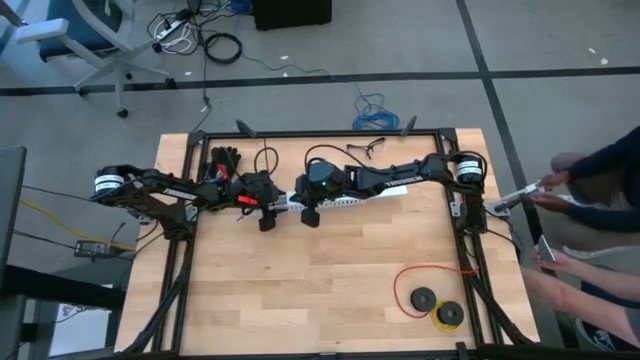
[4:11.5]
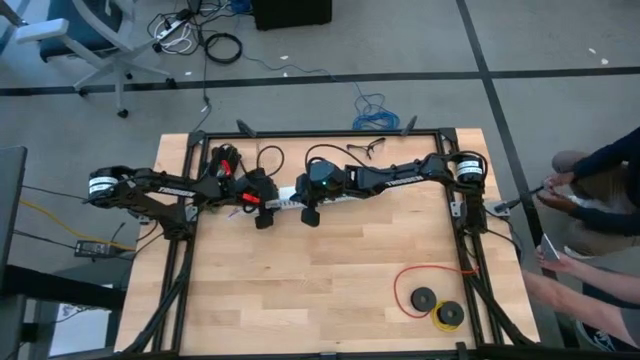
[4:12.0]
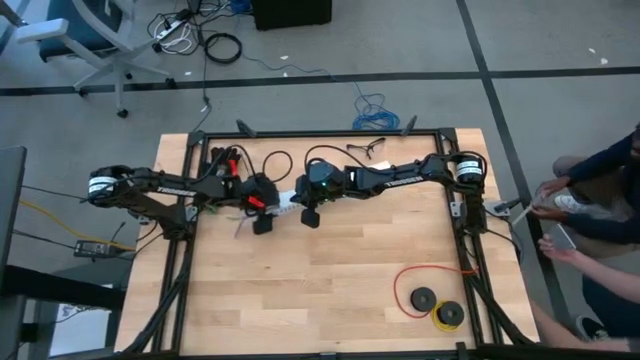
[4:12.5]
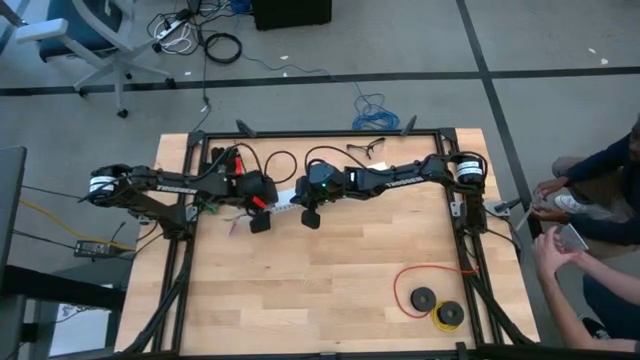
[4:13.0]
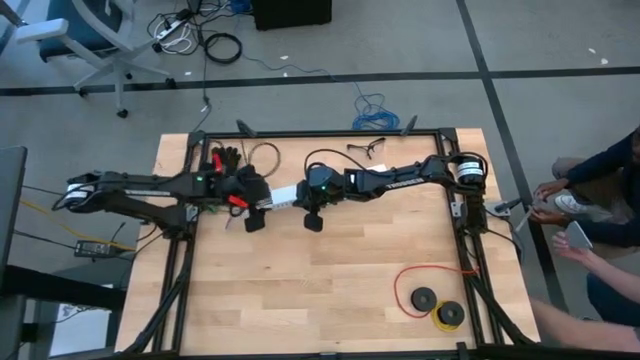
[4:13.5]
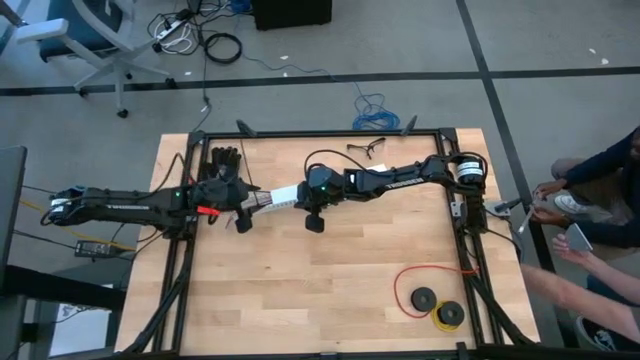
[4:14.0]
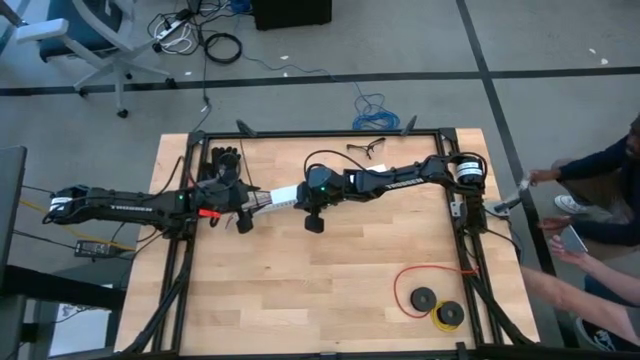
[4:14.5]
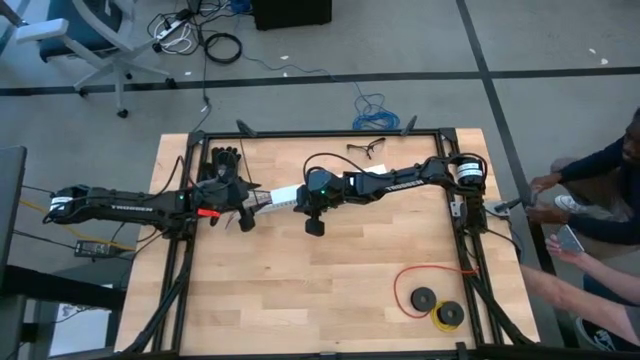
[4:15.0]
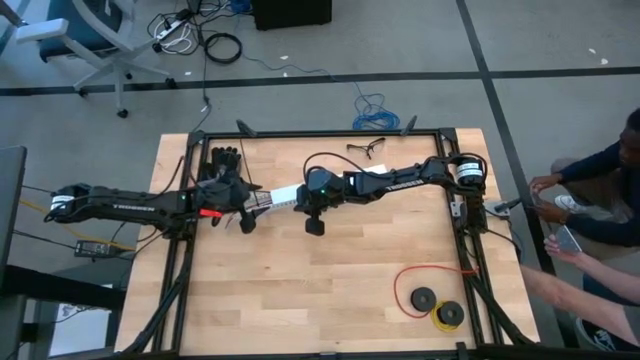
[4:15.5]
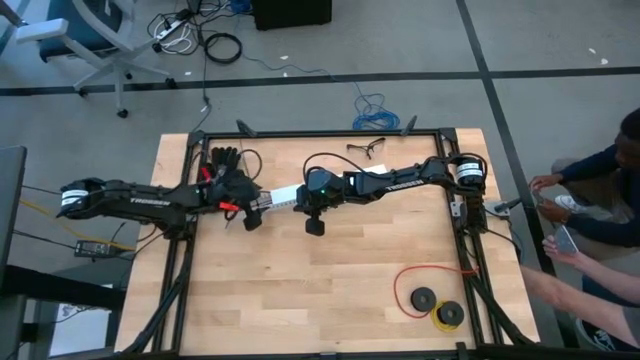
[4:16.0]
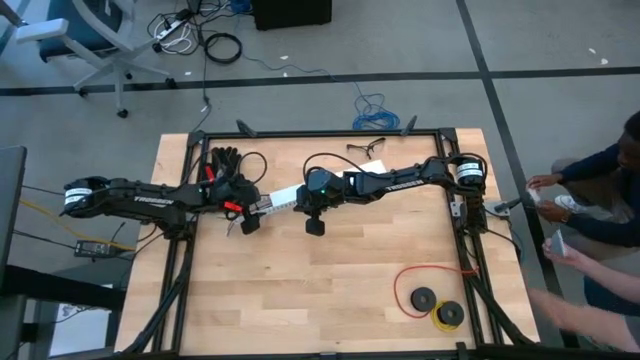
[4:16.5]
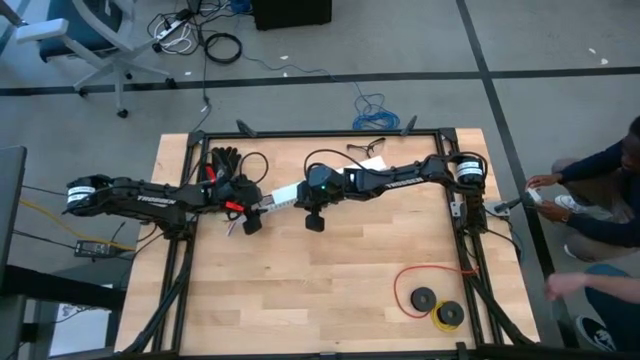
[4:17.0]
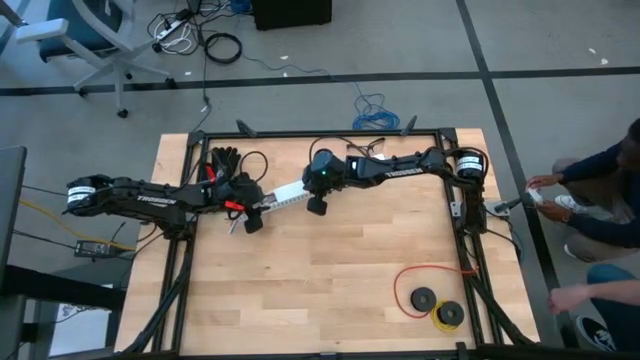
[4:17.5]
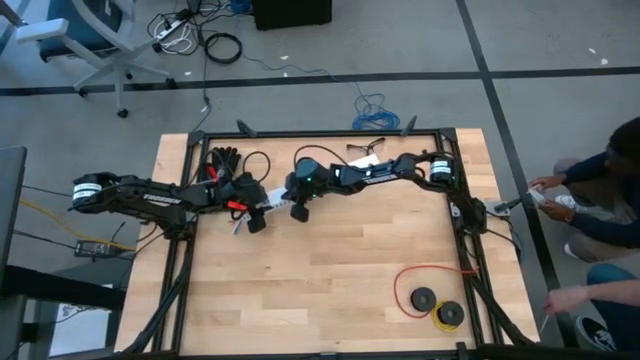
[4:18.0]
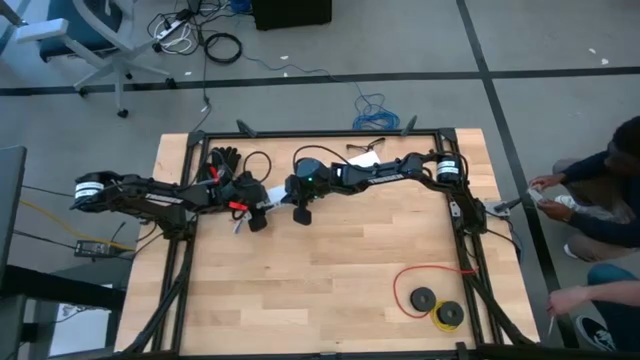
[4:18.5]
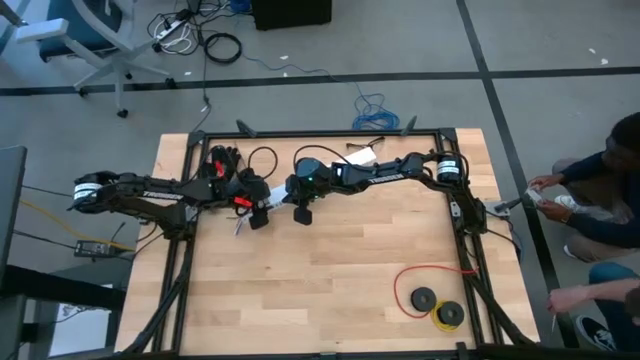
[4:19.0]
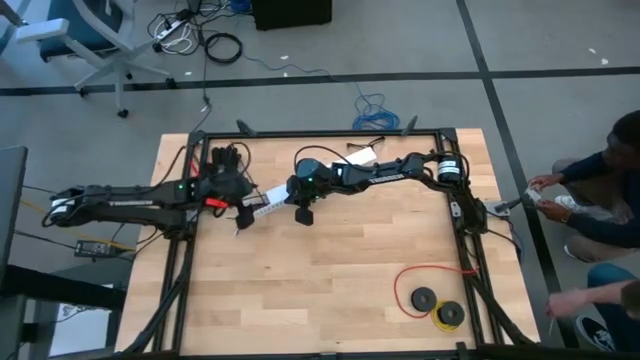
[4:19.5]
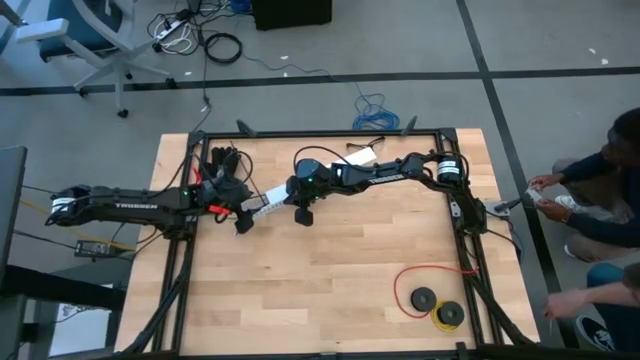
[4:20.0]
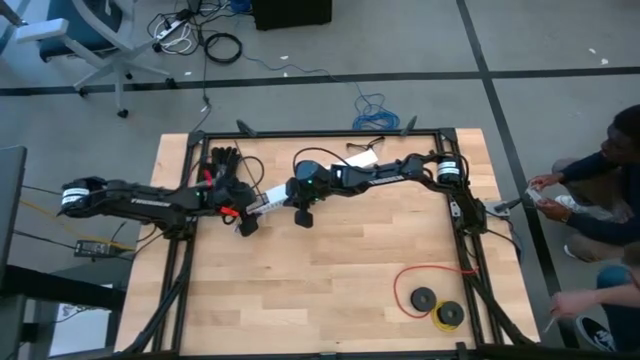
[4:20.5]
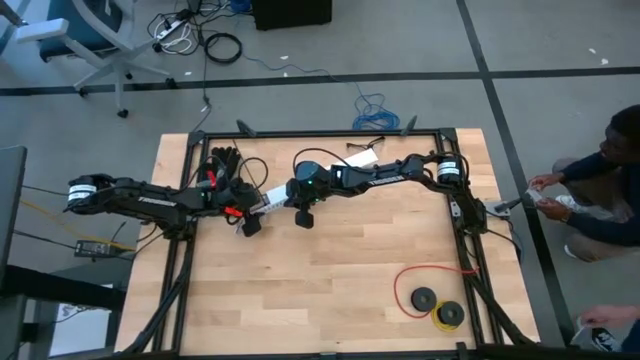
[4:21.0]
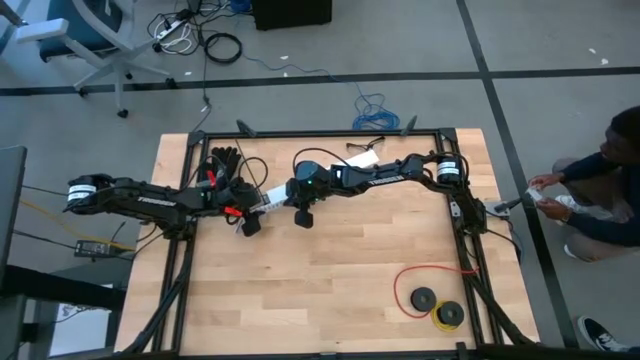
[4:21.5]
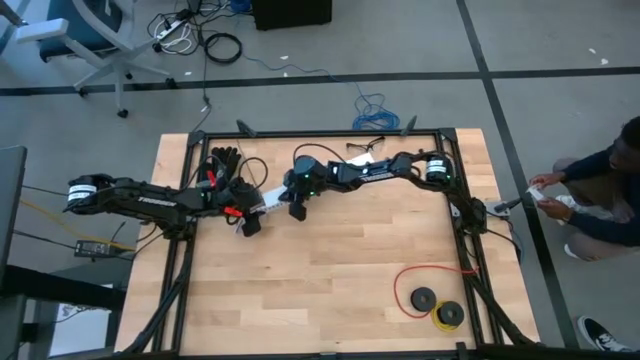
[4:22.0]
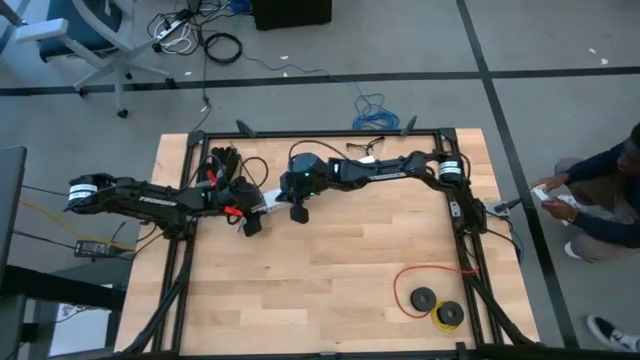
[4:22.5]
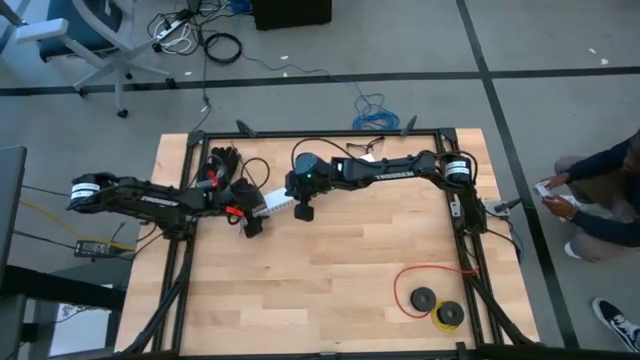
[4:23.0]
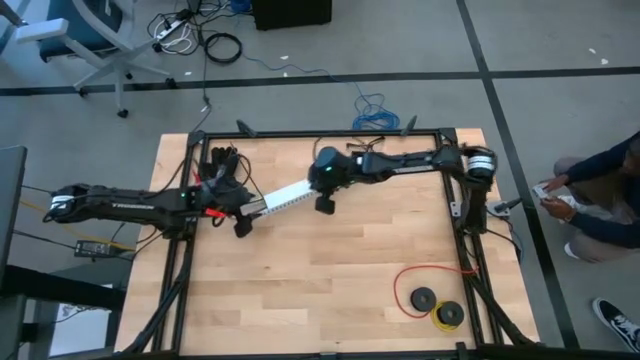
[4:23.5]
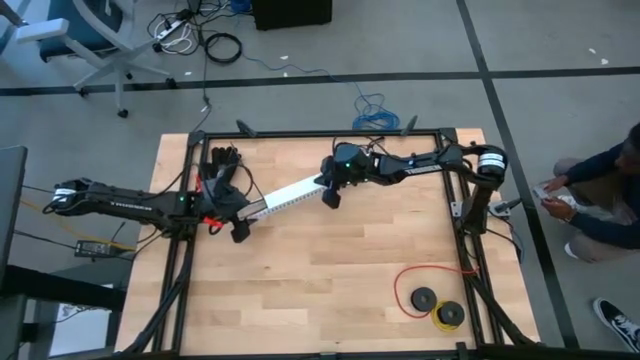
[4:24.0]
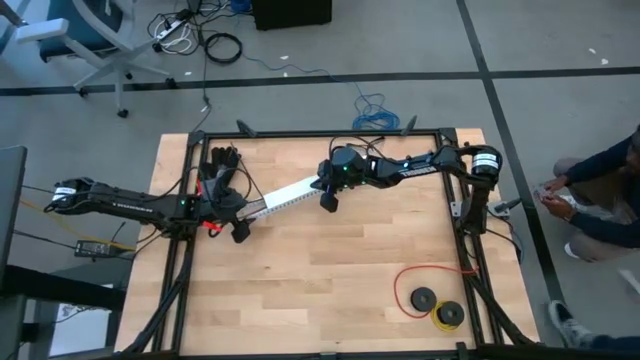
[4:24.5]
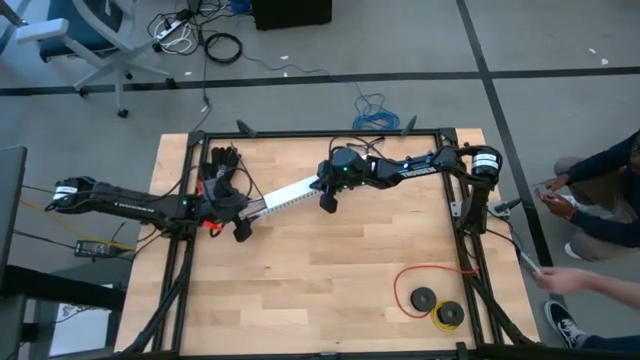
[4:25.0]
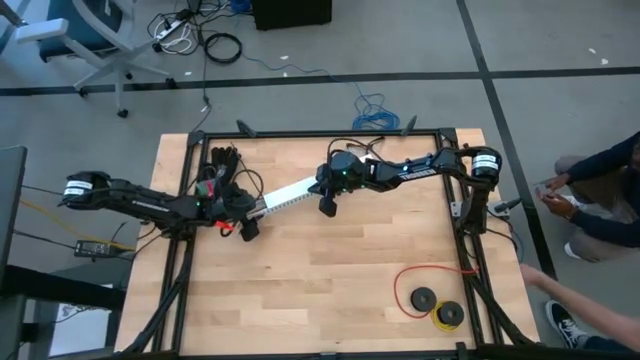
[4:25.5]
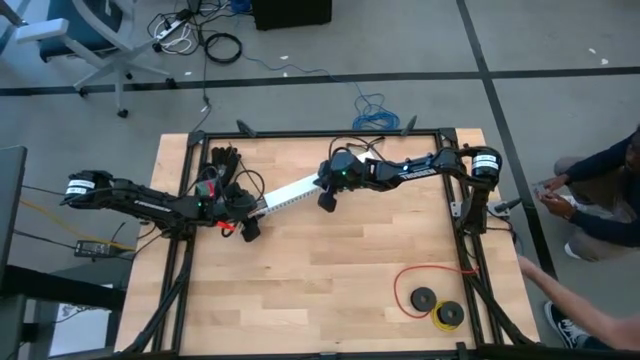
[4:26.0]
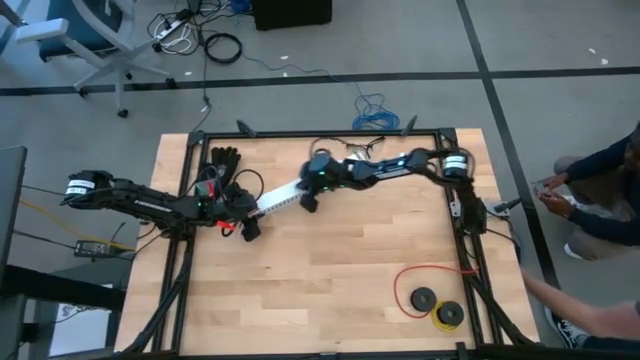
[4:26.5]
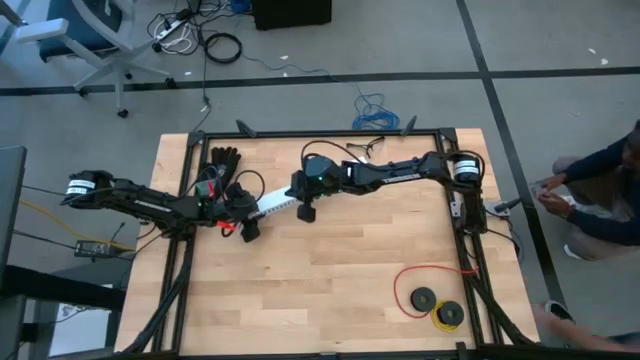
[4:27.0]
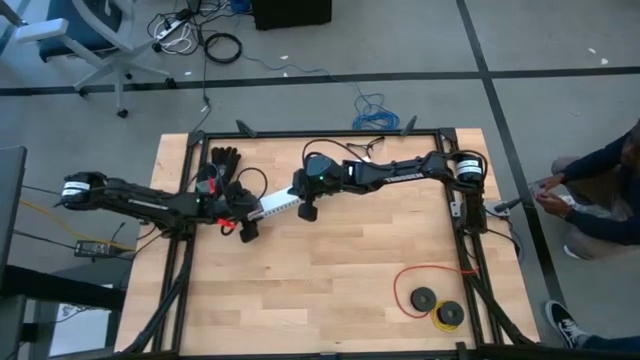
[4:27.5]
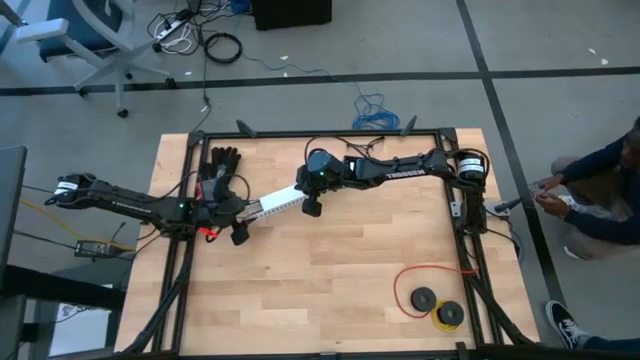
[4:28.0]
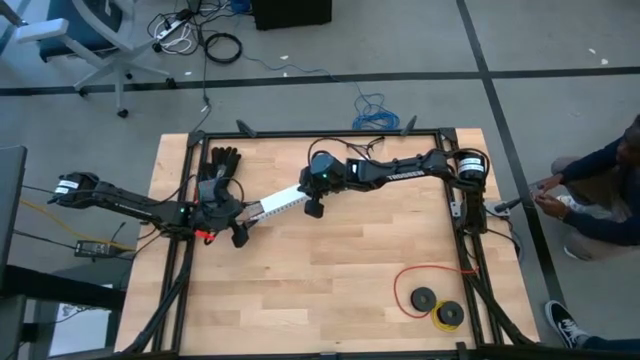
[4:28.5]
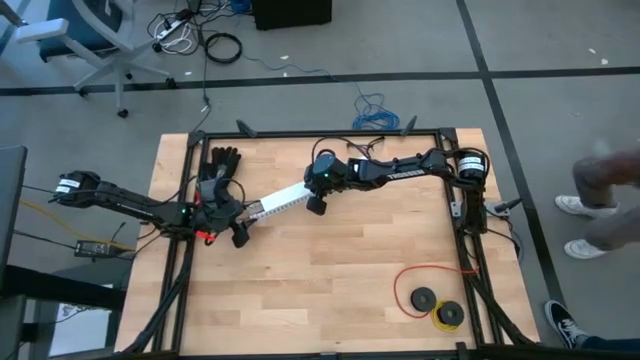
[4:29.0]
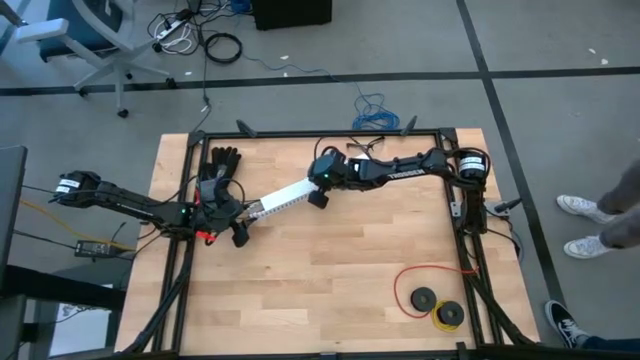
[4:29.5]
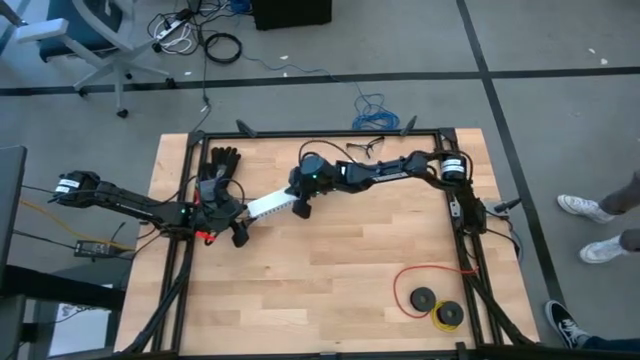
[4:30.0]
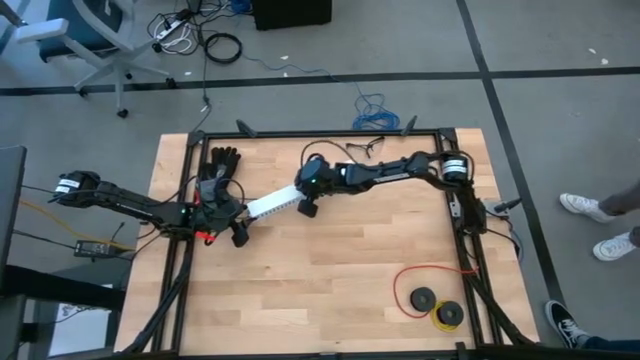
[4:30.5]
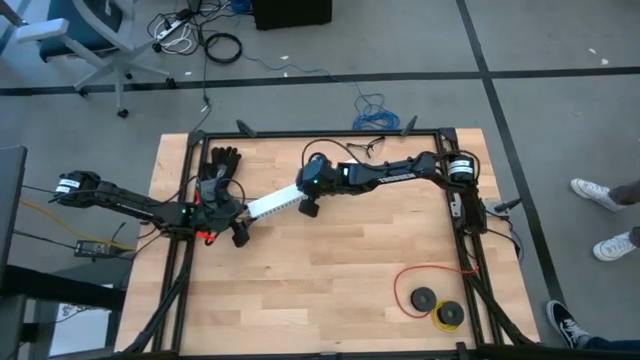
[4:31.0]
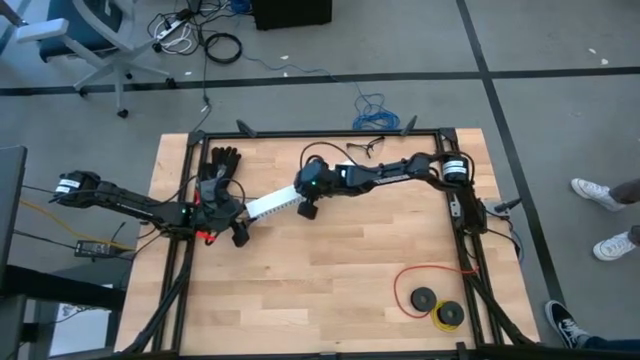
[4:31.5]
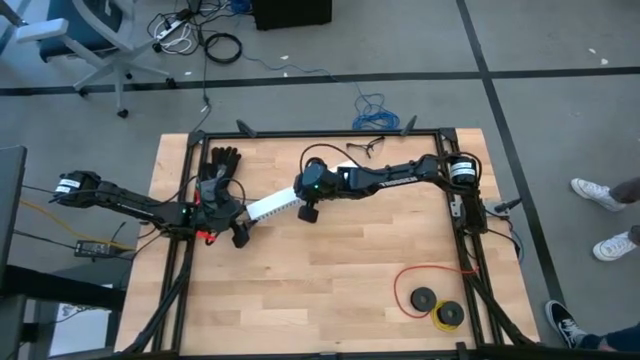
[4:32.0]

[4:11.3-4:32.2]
Task: Ziptie cables
Close the white cable duct
